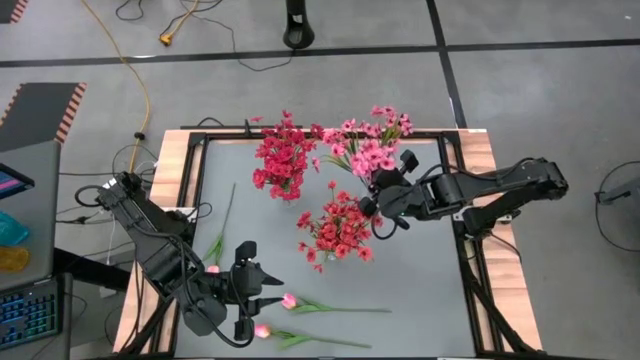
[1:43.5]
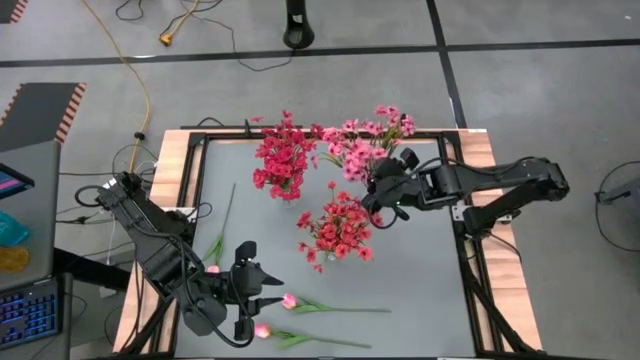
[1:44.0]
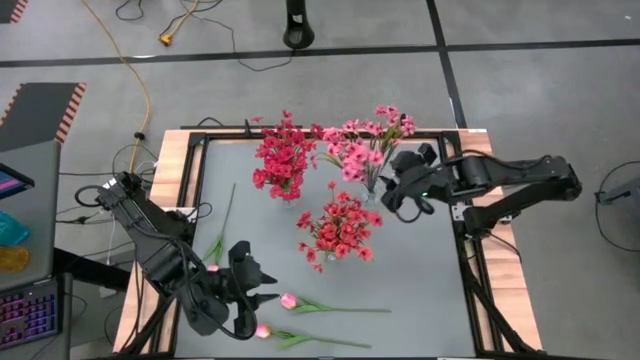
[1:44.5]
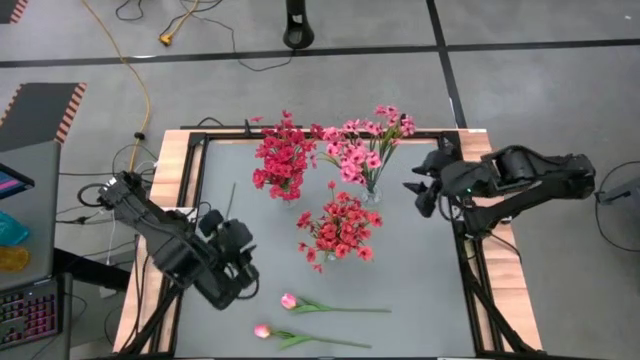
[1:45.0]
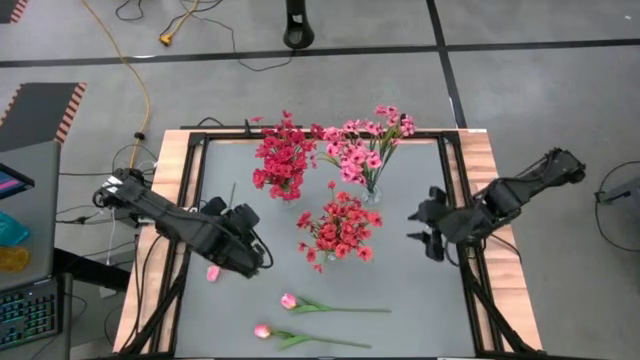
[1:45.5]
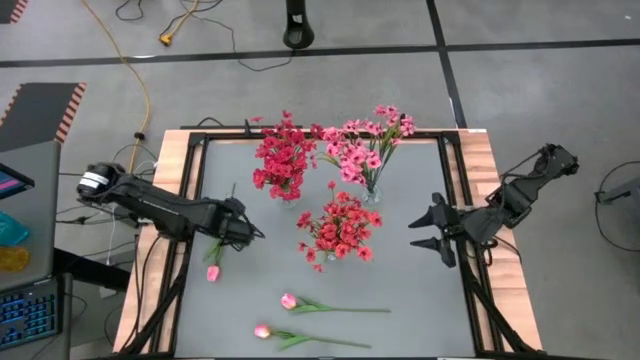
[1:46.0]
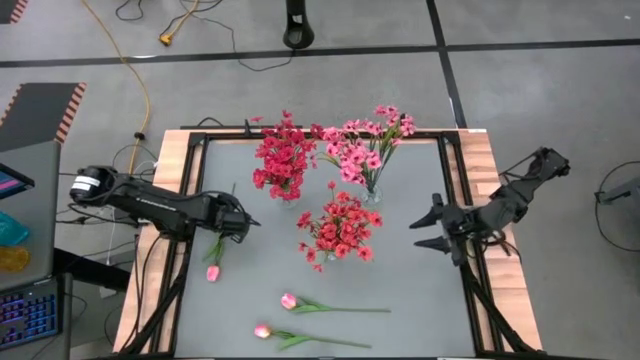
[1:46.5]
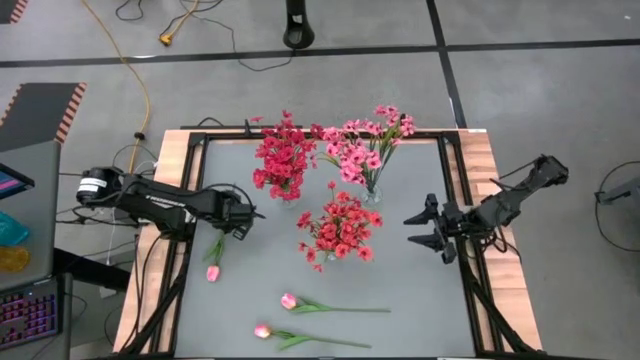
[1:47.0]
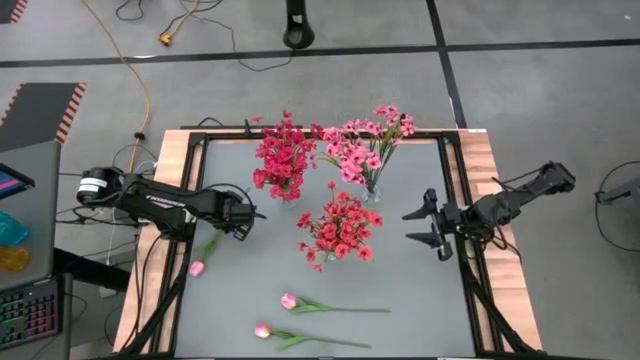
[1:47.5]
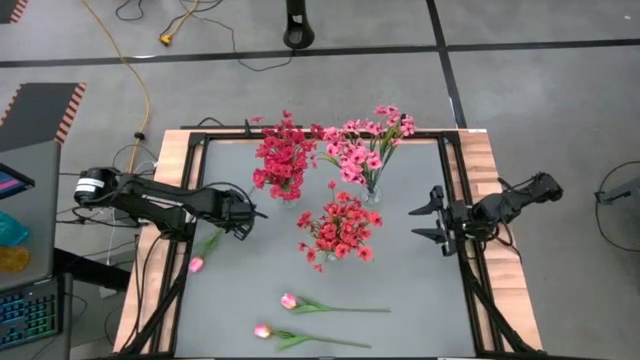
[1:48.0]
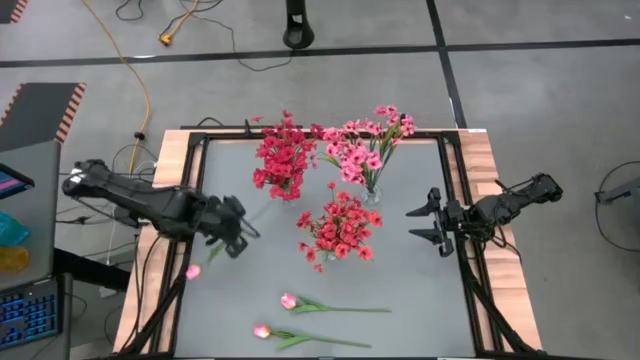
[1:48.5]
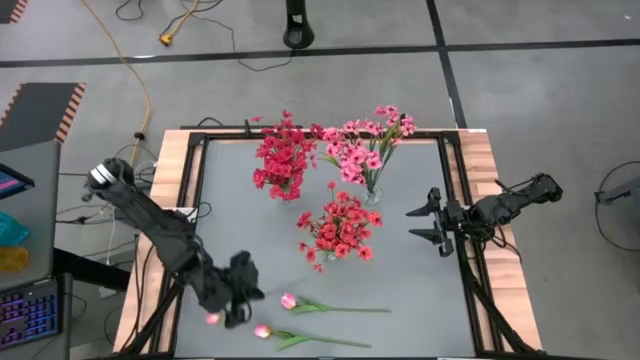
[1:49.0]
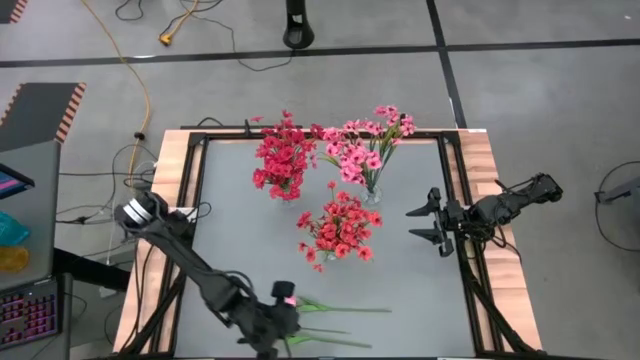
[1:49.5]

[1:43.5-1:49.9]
Task: Sort flowers into vase by color
Move the pink flower onto the bottom center table

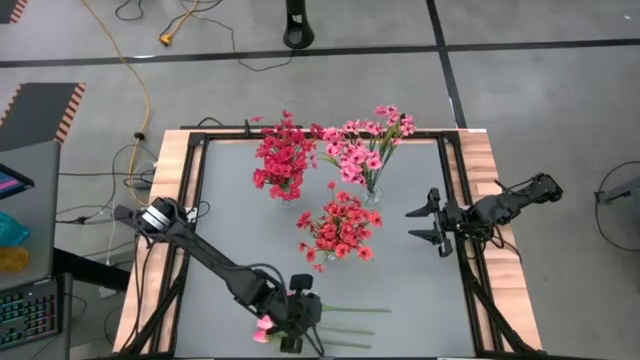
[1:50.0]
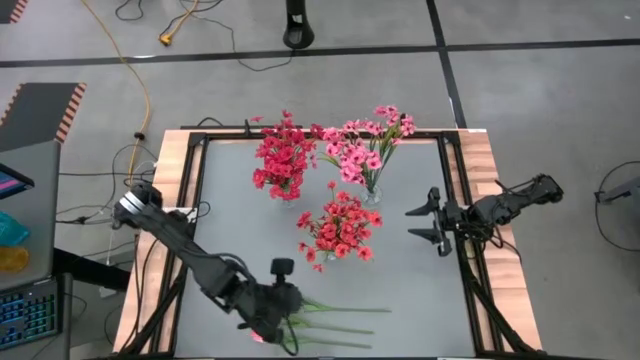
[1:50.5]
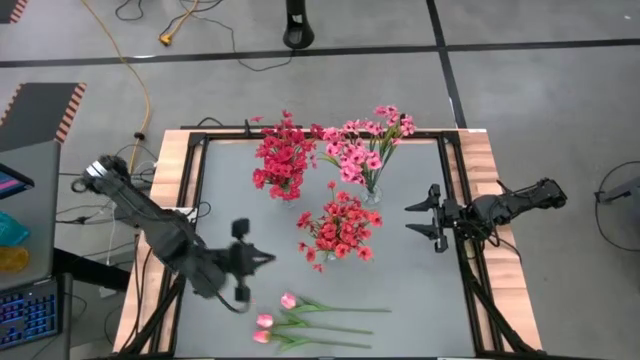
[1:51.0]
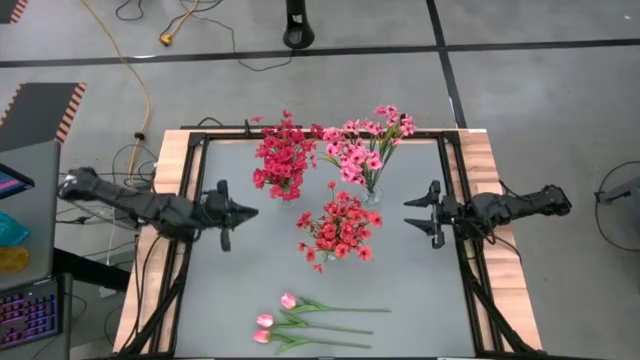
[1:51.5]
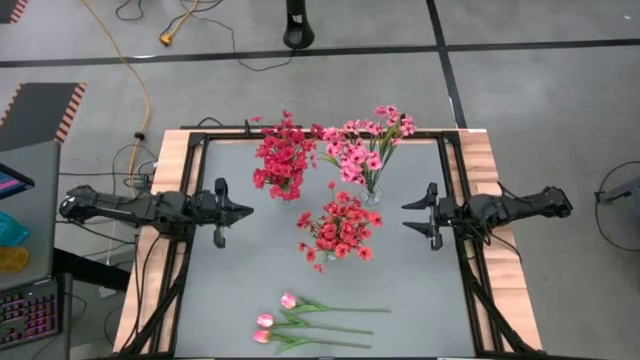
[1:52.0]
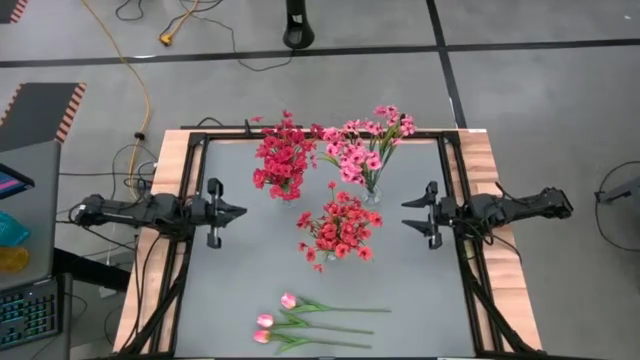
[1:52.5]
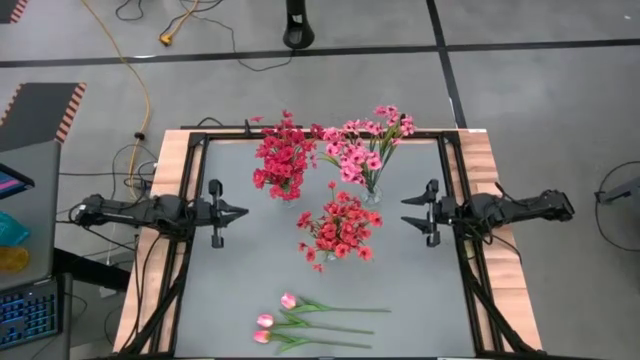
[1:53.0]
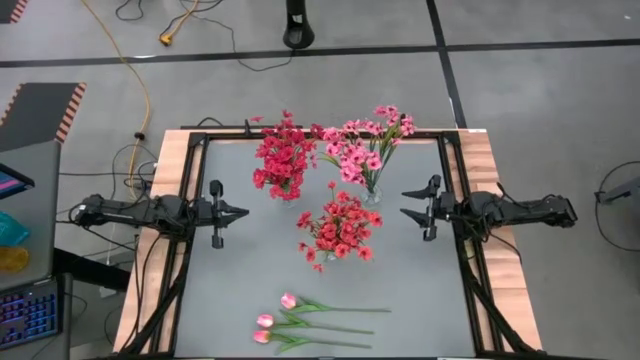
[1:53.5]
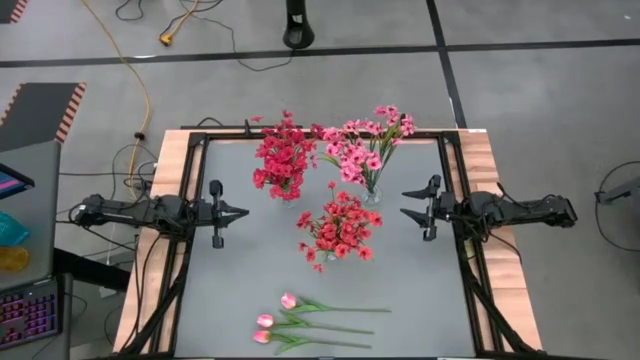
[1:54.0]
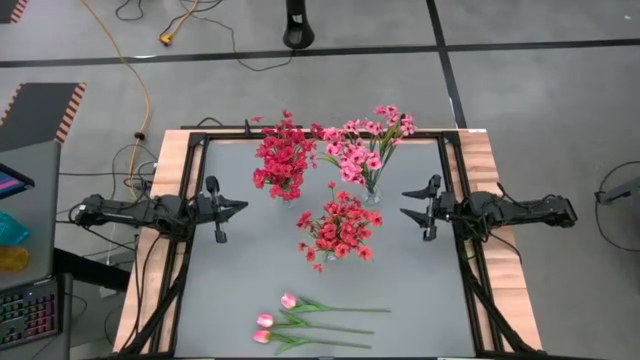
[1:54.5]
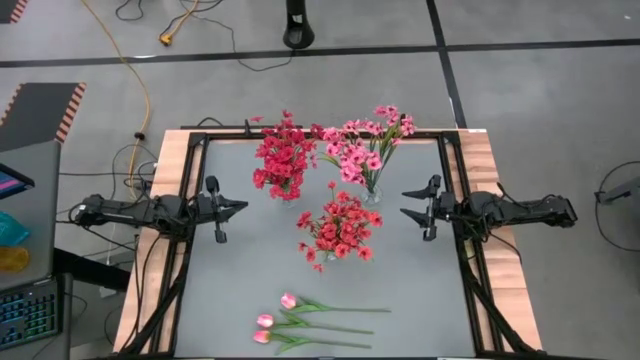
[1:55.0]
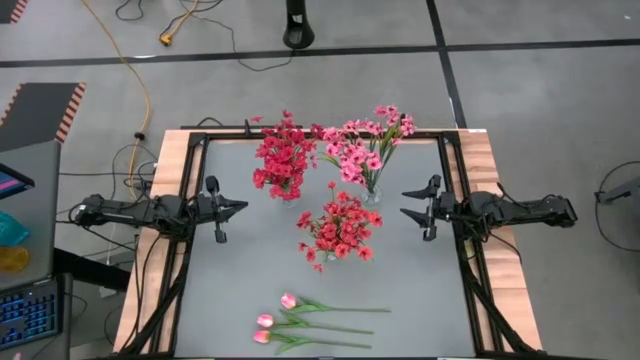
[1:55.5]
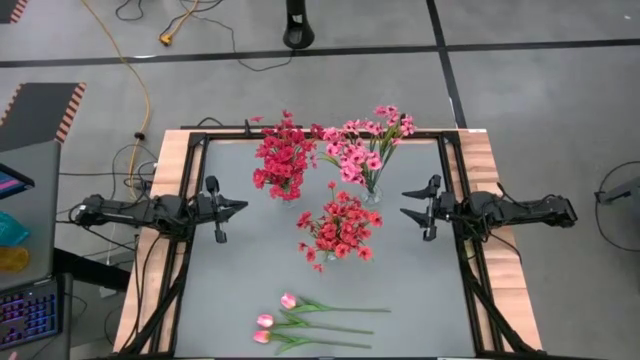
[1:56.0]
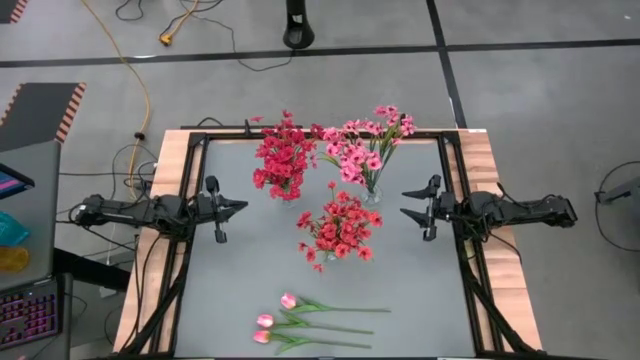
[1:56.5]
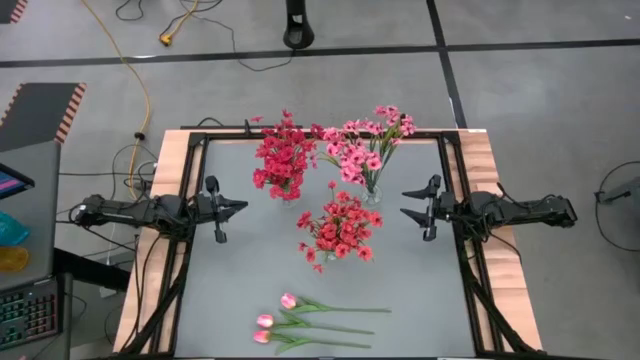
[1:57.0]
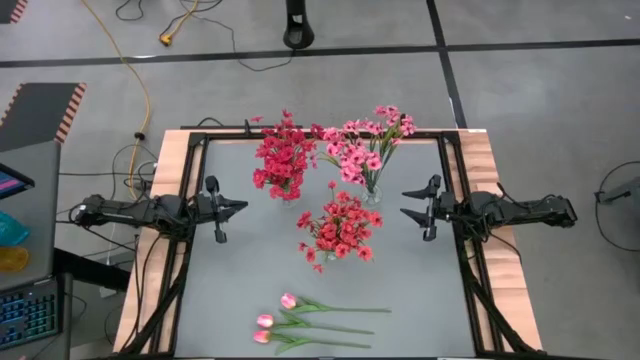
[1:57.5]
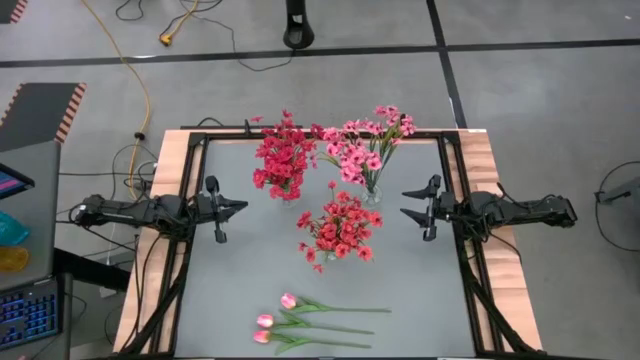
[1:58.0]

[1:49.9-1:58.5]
Return to Home Position

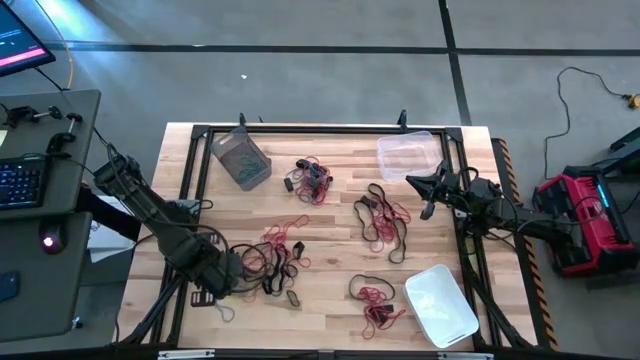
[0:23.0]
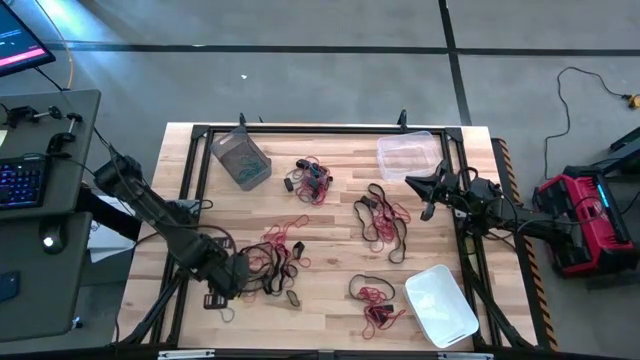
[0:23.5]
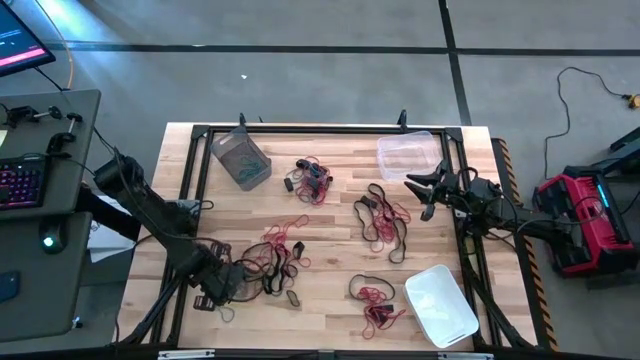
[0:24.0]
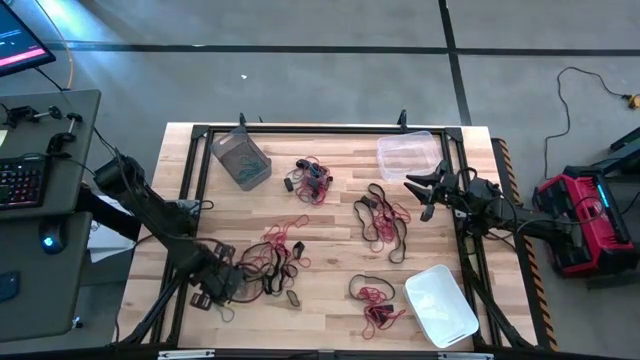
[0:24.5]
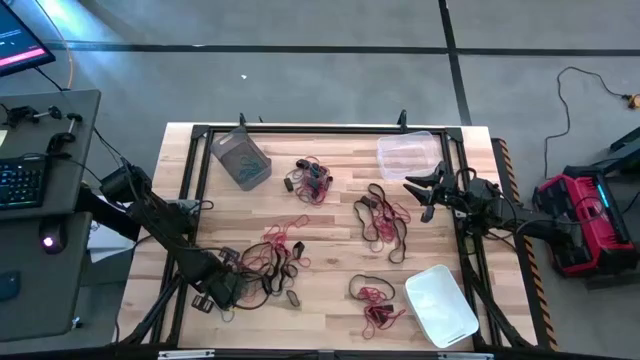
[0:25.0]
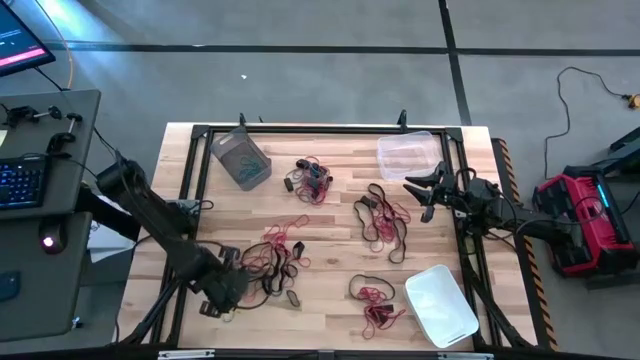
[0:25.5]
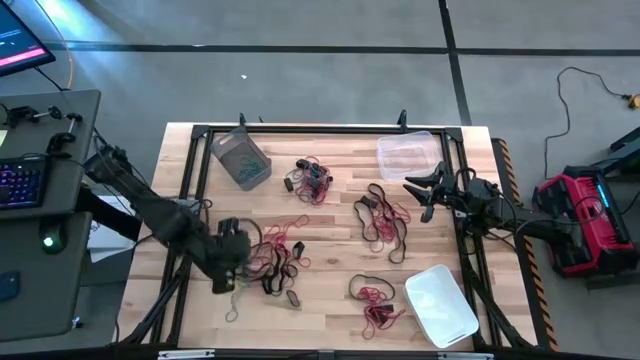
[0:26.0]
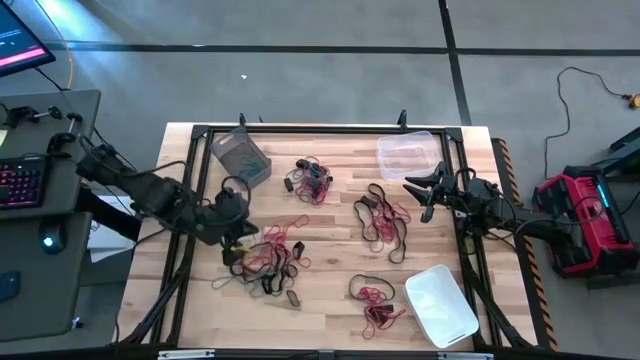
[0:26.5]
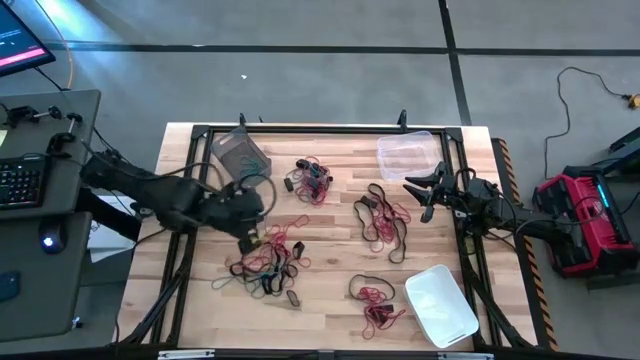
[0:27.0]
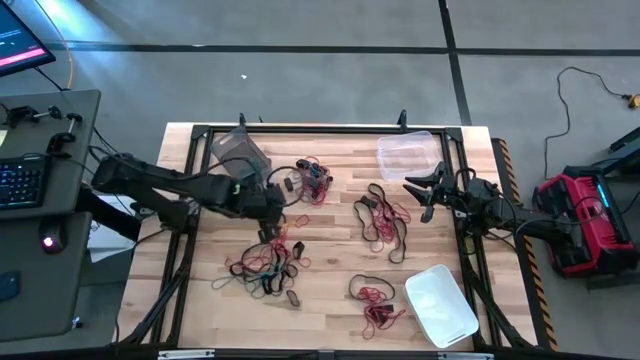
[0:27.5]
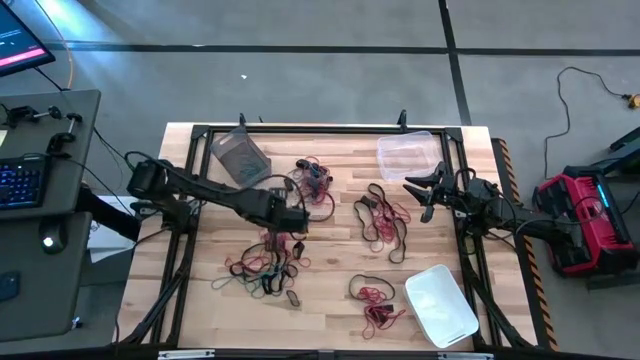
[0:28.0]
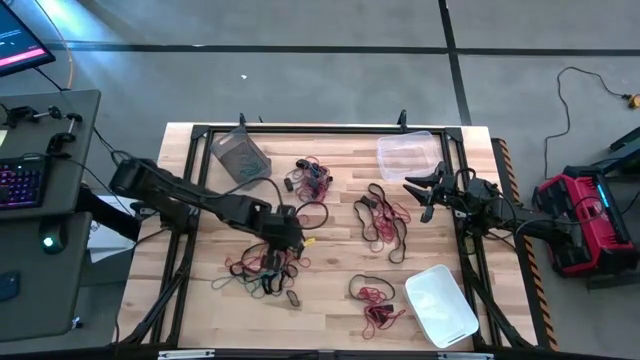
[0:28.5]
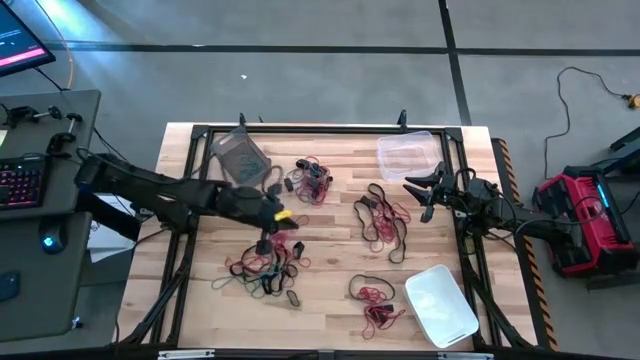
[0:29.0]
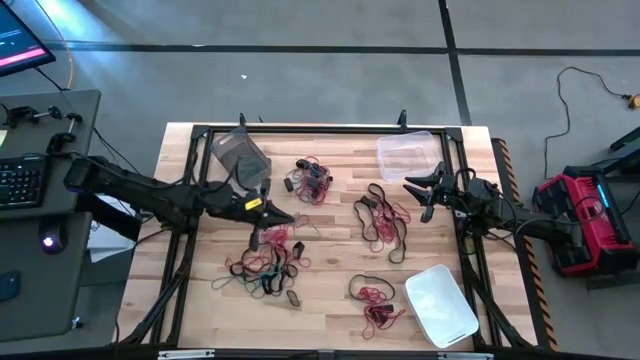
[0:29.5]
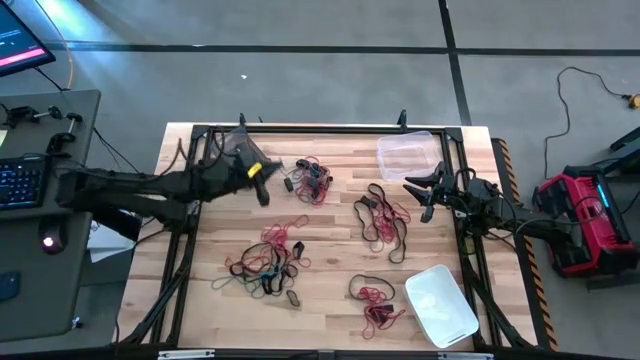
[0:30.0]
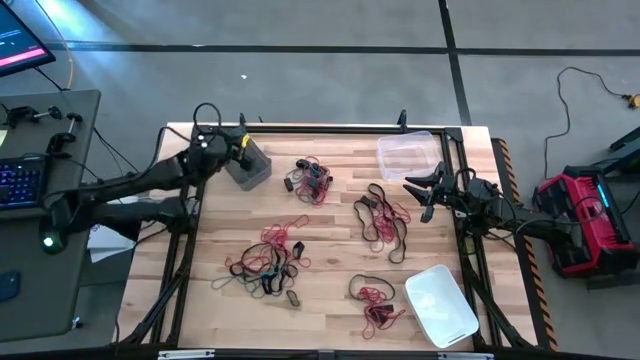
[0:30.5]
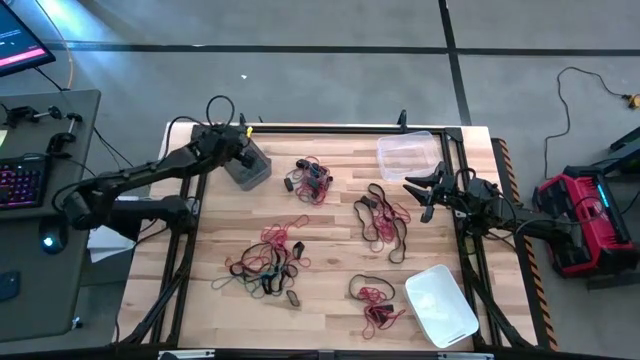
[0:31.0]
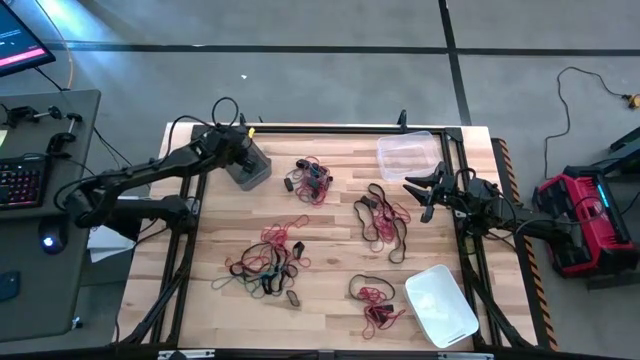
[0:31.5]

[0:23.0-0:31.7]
Task: Sort rubber bands into baskets
Put the blue rubber band into the black bin
